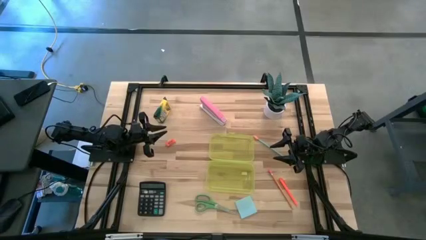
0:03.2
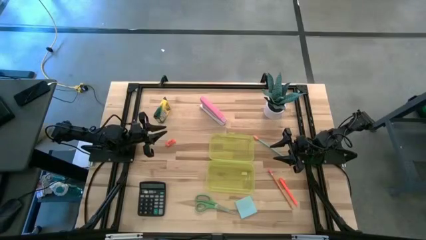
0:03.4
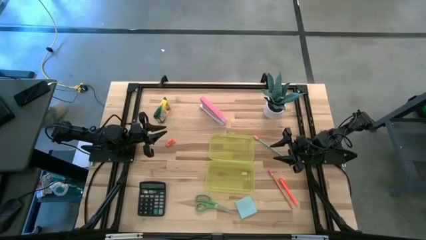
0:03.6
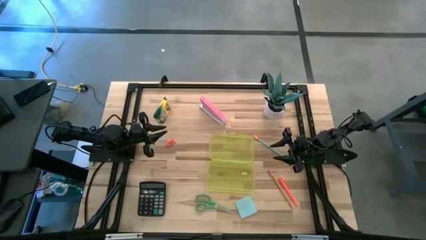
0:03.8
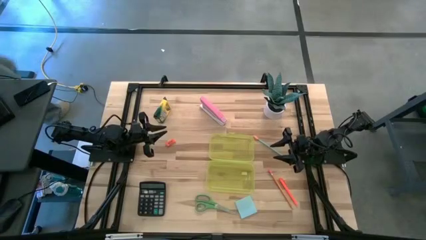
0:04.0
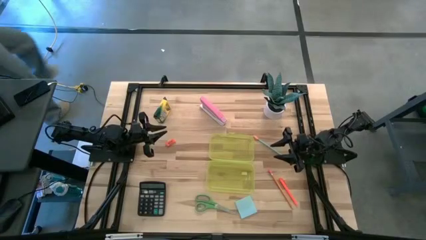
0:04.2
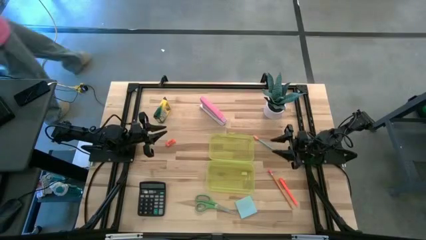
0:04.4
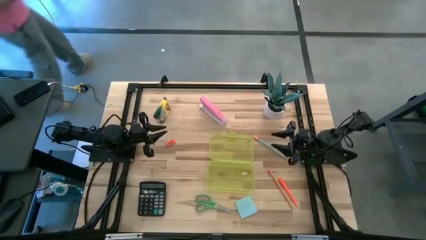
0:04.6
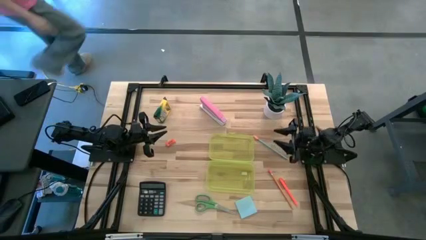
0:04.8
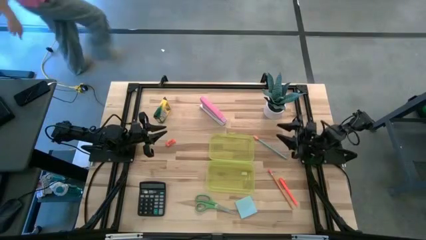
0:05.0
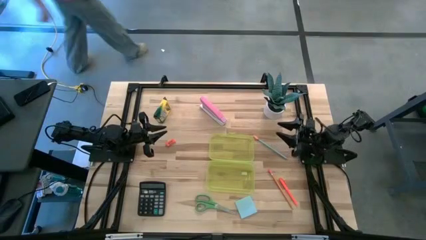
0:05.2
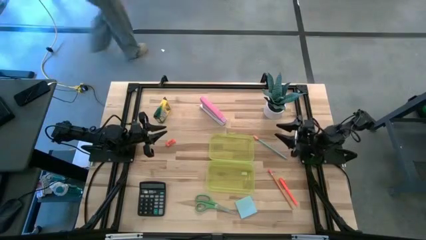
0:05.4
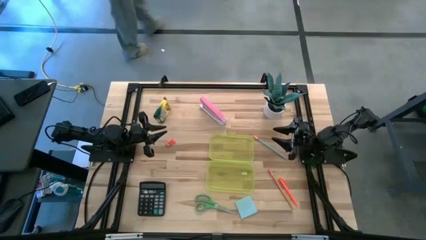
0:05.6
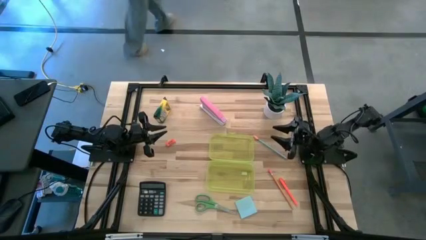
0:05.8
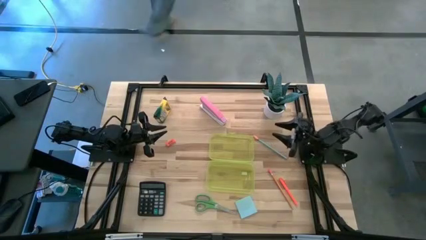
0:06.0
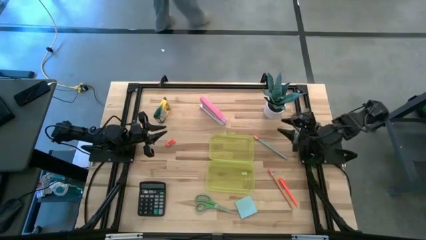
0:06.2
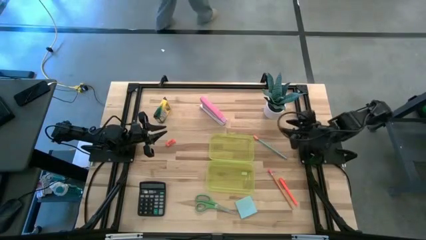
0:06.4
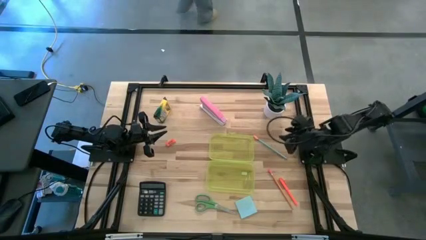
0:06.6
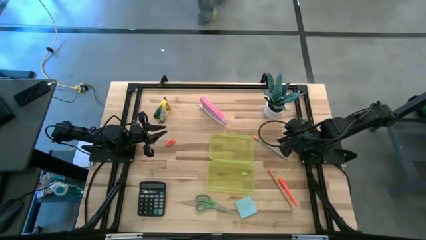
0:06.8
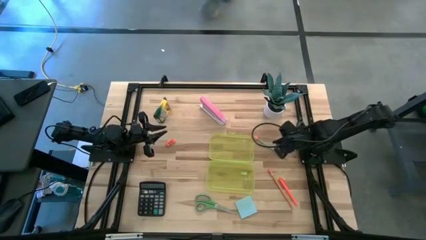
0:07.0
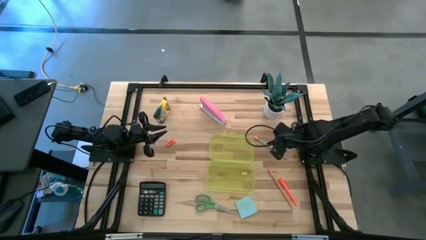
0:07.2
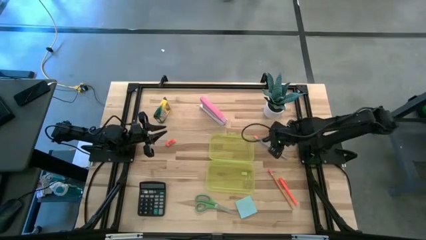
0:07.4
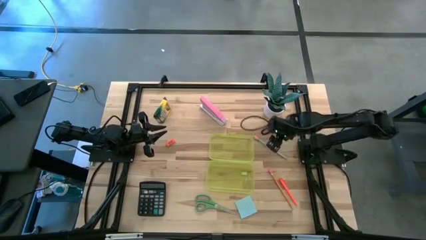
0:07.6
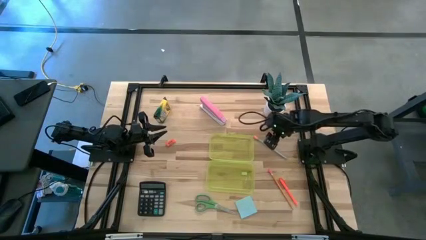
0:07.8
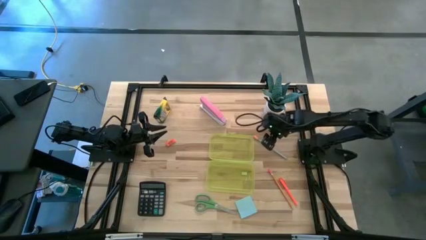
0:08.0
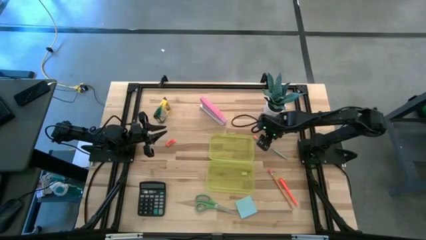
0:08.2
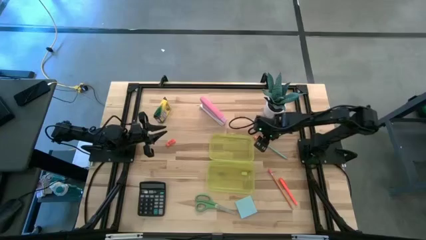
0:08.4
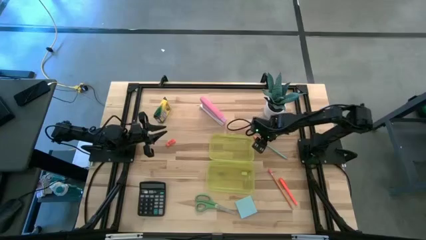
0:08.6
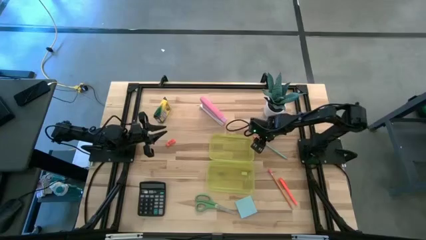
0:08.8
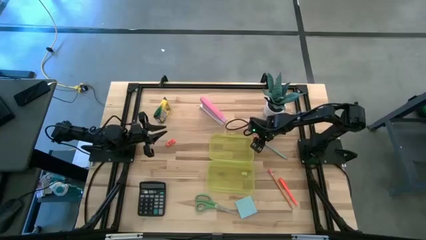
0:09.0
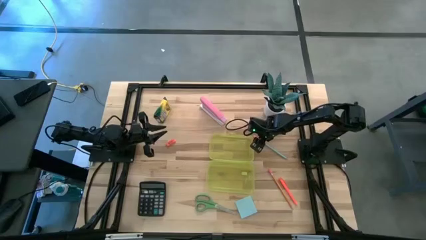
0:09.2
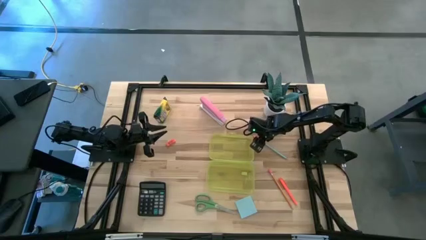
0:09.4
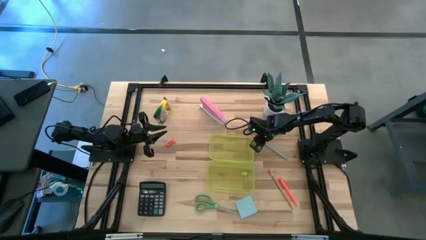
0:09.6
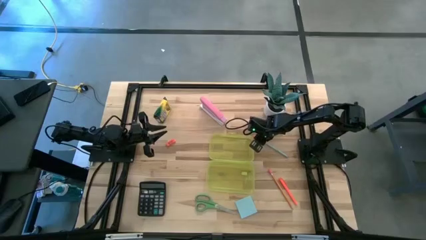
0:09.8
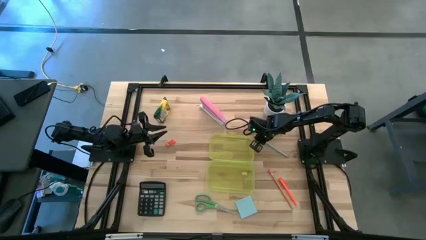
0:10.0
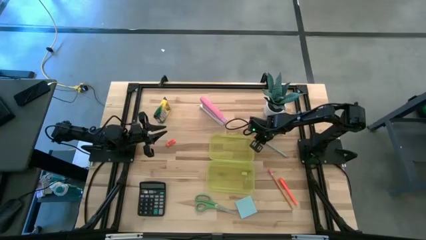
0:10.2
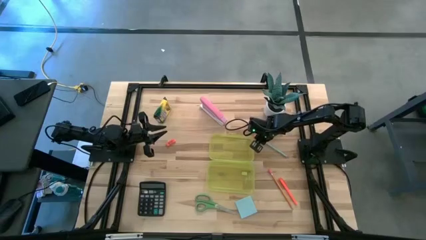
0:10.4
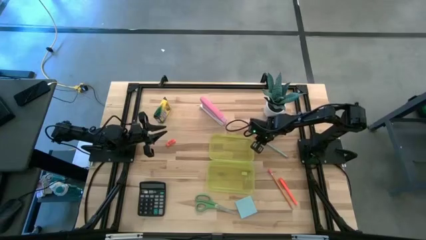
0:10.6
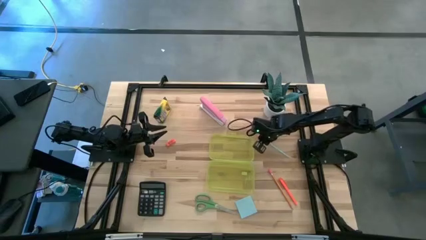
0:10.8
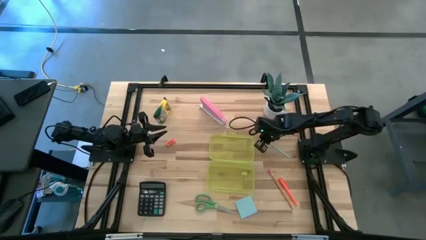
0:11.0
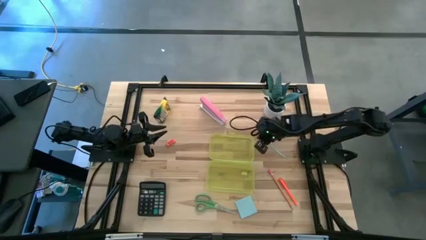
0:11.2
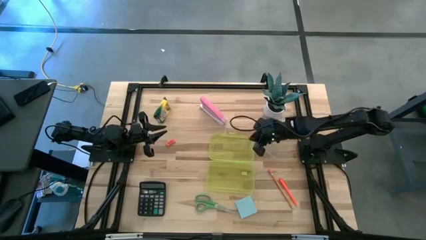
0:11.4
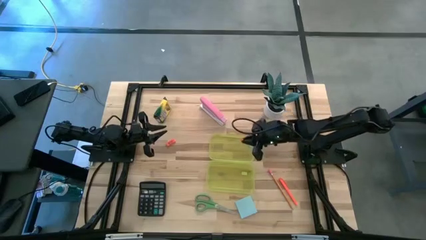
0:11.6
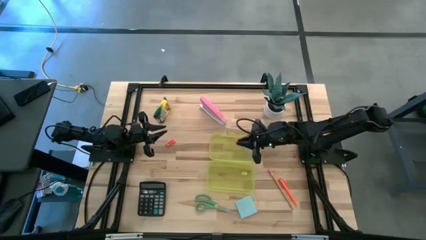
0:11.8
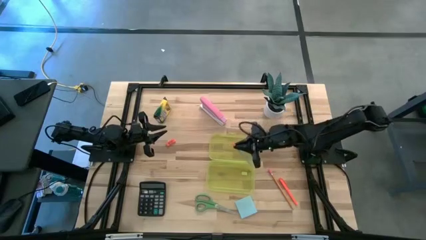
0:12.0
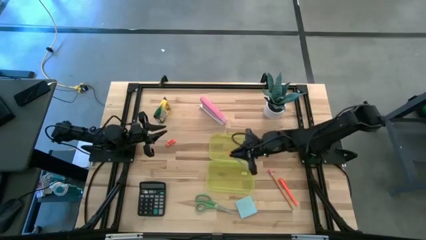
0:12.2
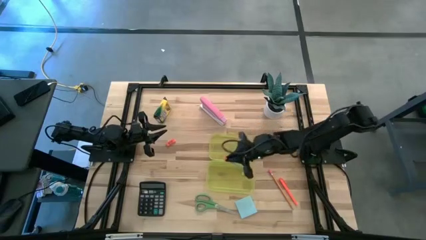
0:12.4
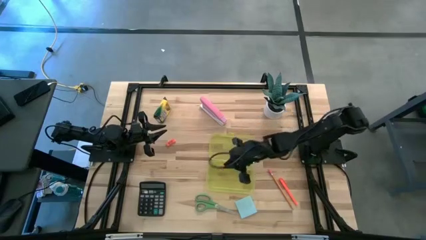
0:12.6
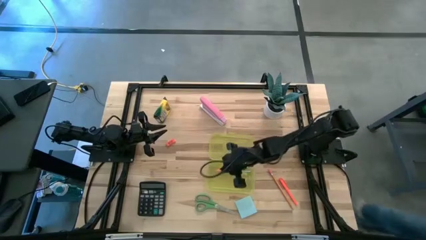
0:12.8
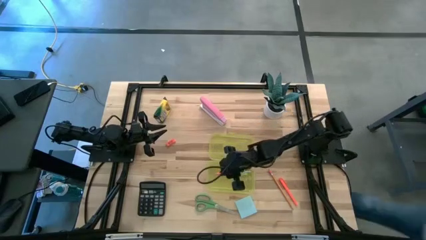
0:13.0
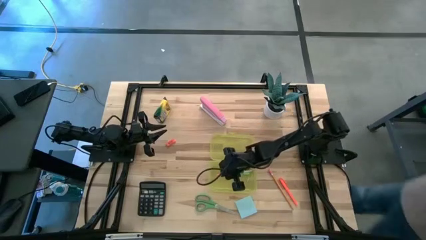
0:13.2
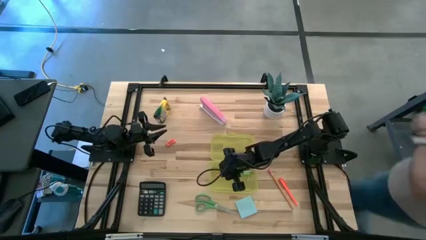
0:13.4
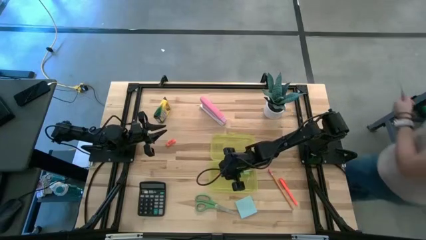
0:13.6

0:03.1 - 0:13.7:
Task: Pack school essentials
Put the blue pencil into the yellow supply box

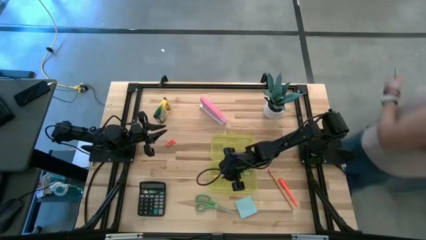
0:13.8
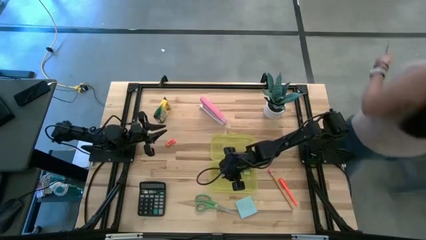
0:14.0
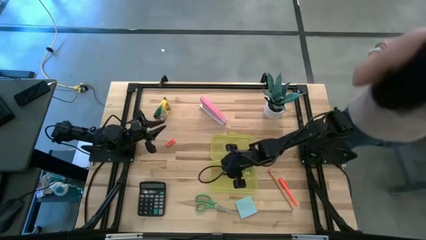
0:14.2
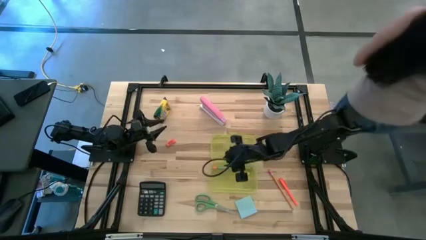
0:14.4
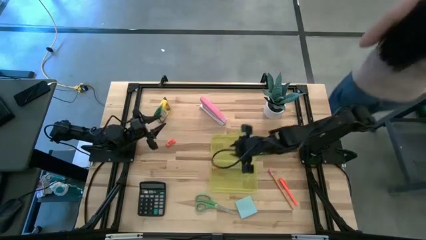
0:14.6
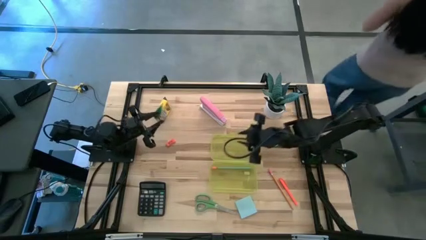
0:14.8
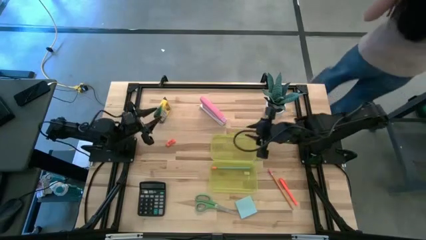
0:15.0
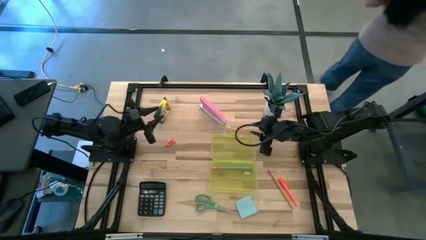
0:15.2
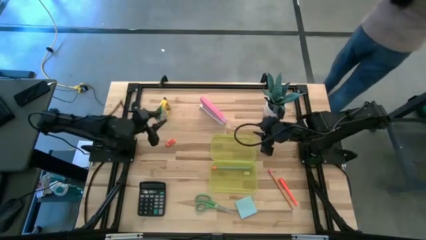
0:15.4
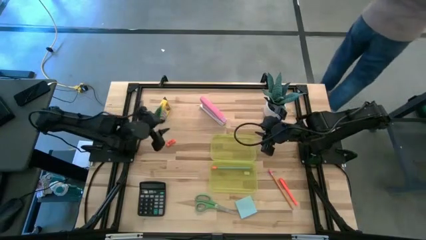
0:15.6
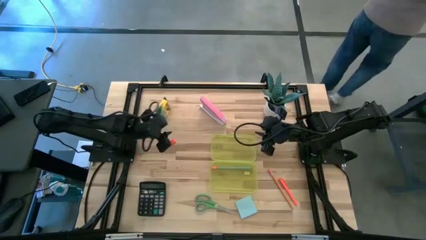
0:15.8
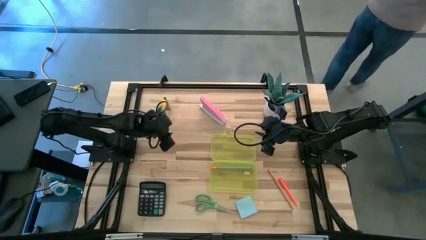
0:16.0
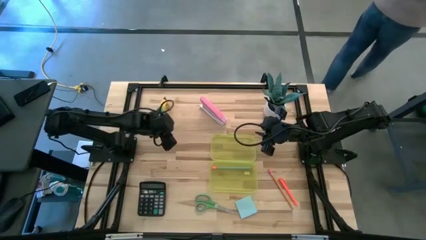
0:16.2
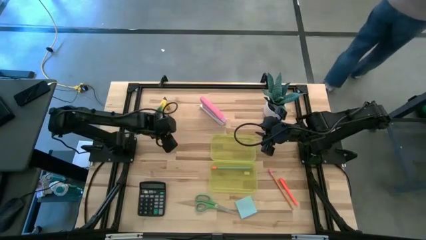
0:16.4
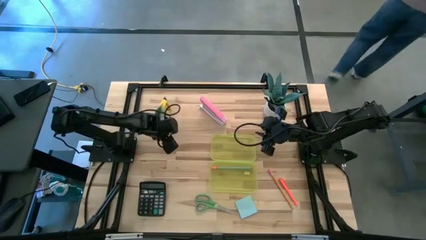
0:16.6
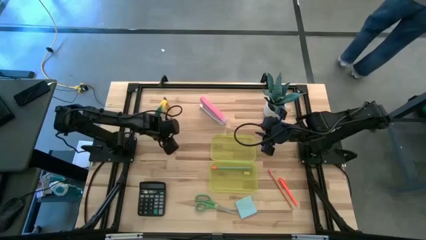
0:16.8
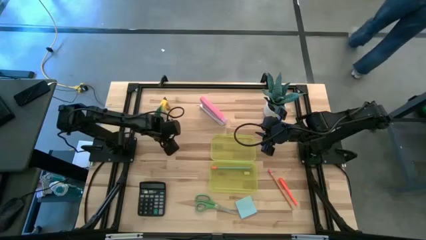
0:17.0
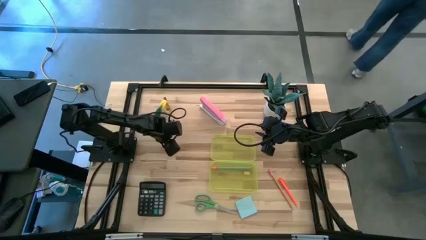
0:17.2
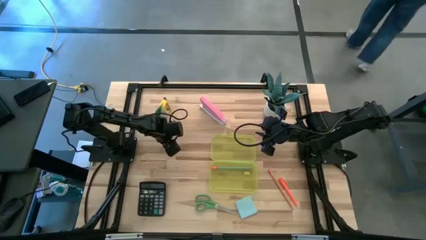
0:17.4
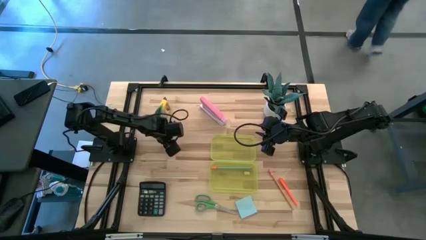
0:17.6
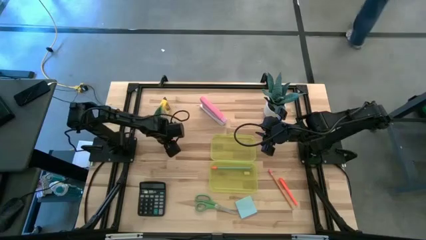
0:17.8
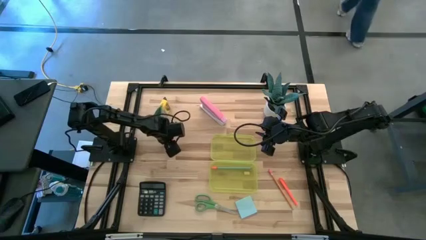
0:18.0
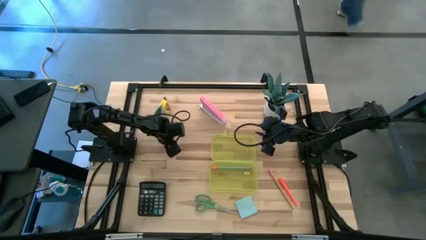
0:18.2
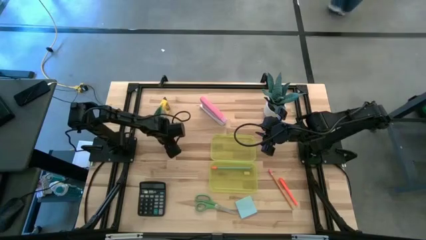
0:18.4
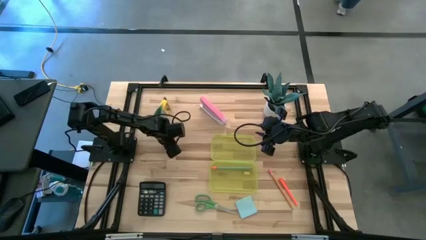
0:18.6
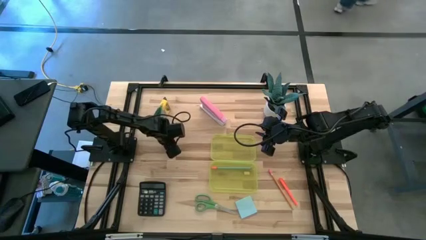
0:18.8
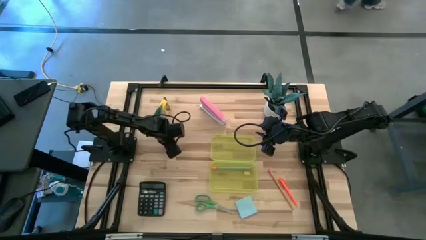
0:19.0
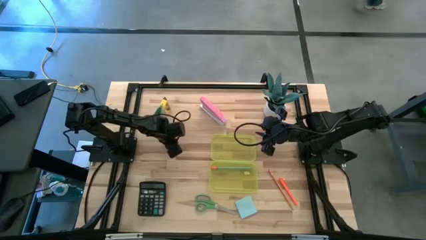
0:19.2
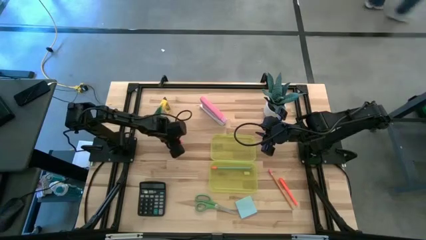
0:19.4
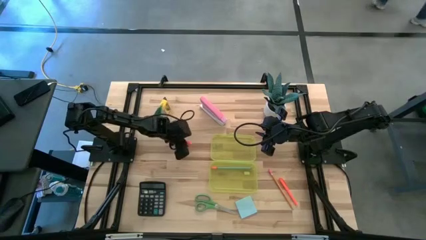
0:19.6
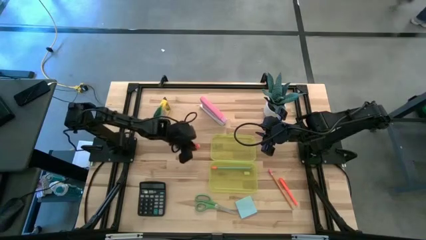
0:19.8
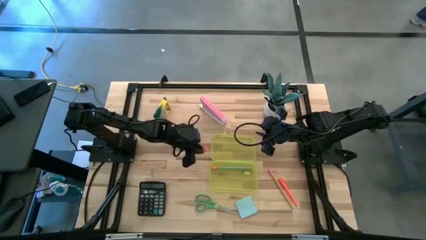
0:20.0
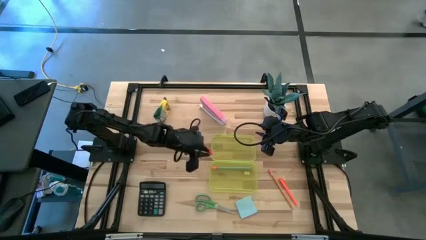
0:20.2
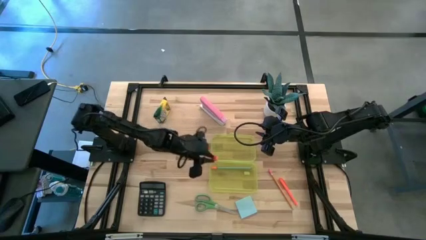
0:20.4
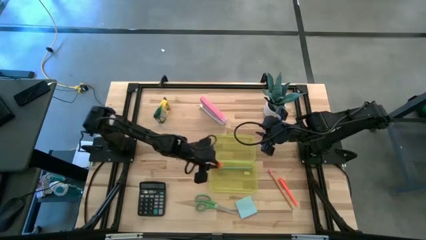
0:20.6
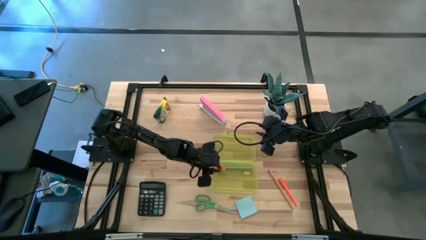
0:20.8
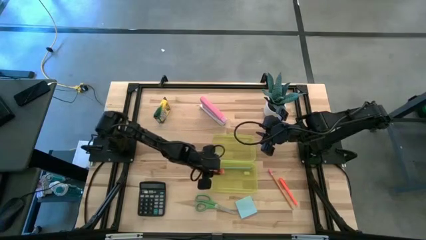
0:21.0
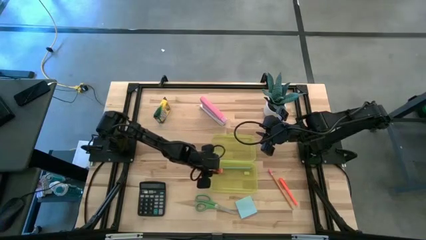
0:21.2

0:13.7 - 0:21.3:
Put the orange eraser into the yellow supply box
